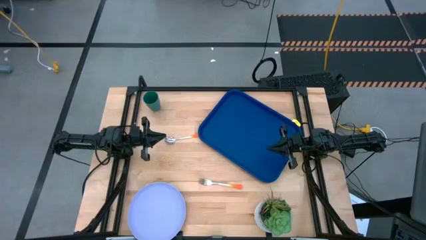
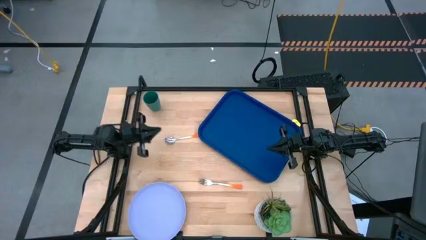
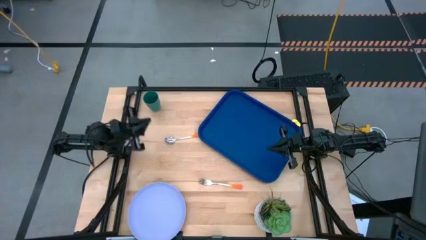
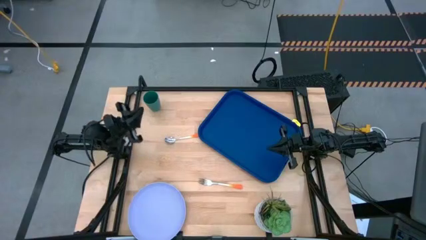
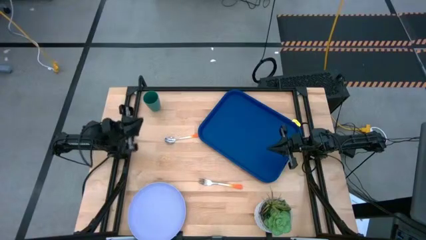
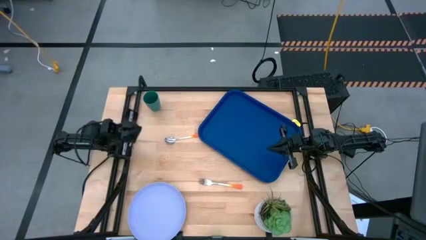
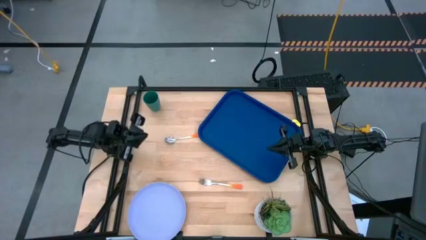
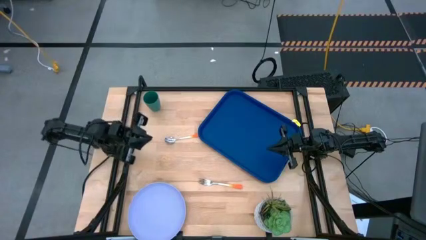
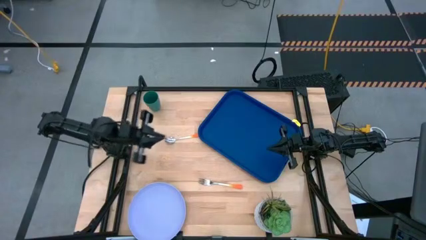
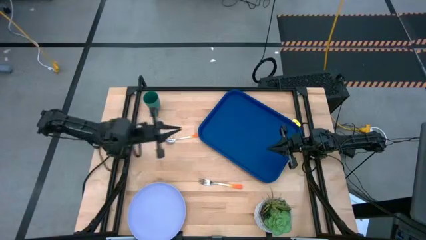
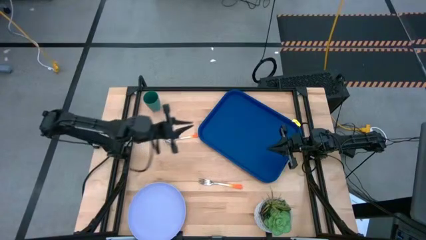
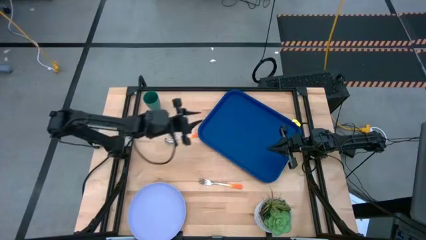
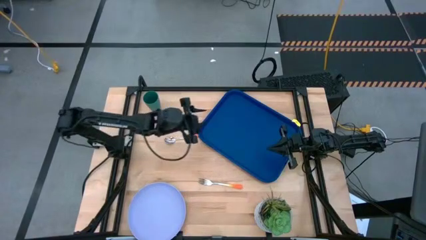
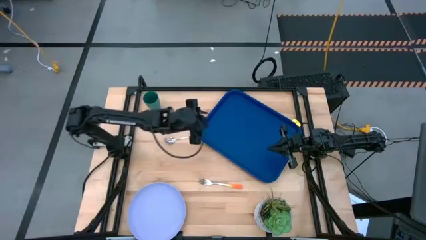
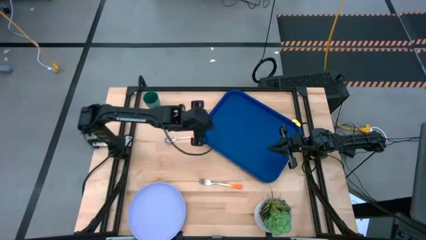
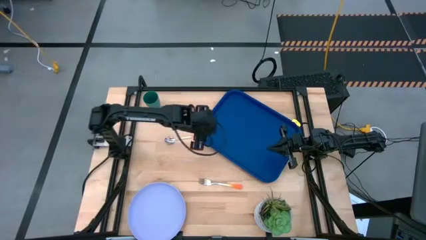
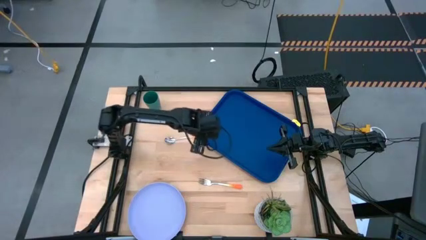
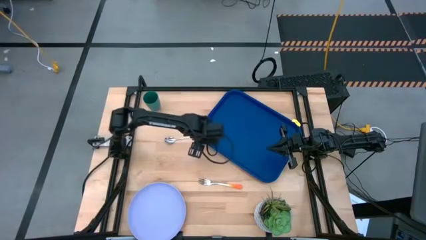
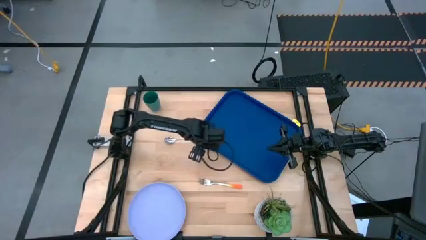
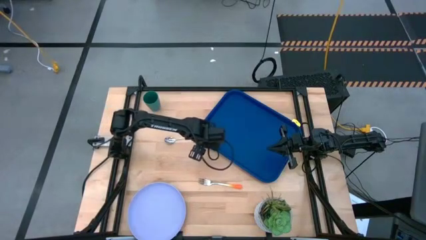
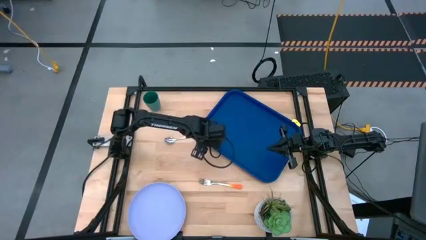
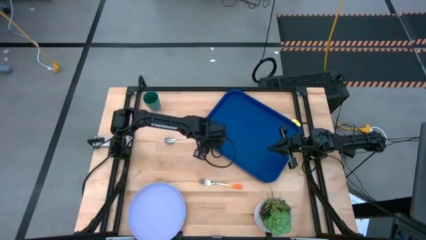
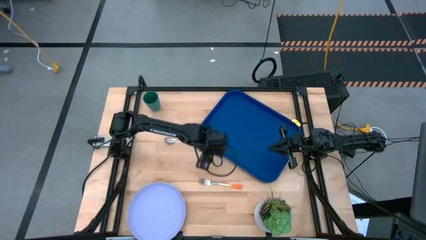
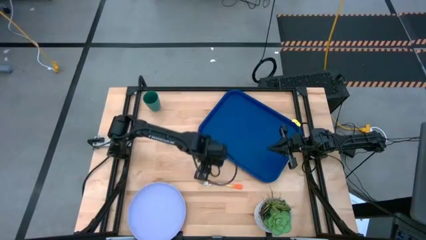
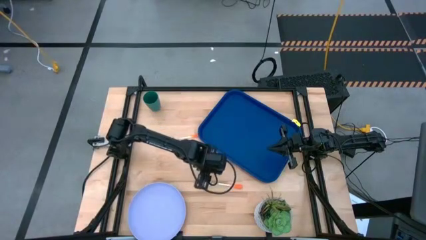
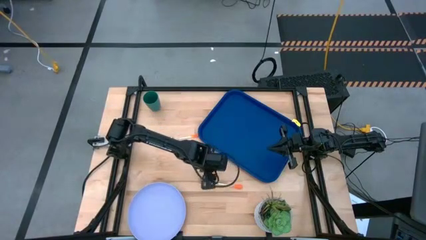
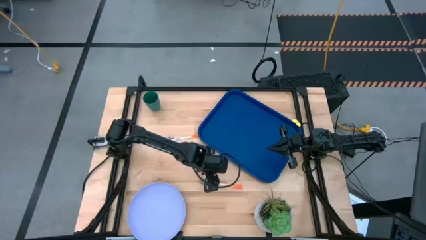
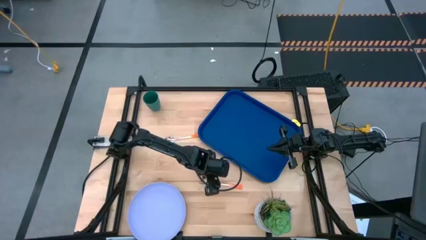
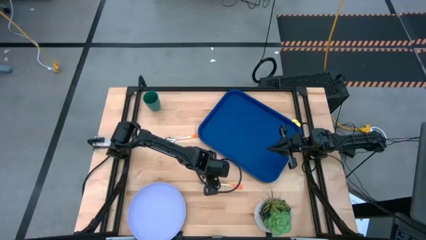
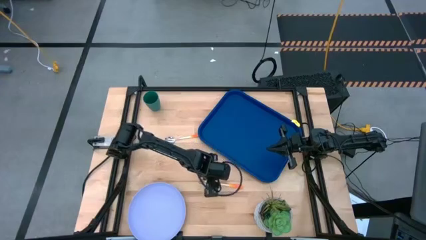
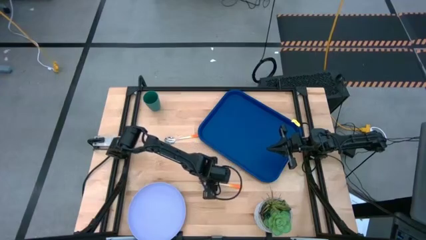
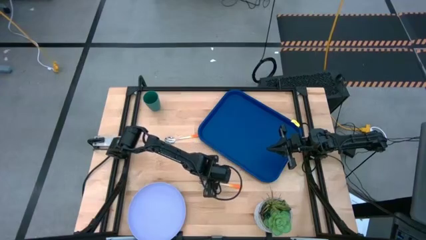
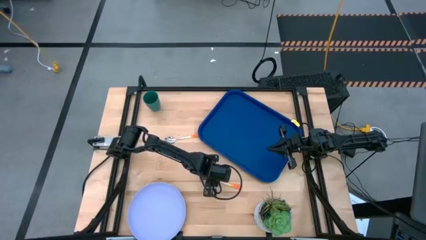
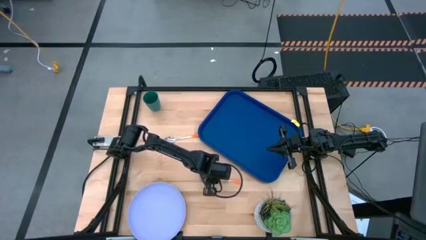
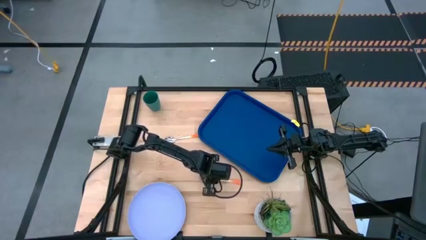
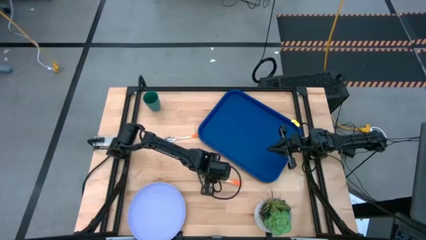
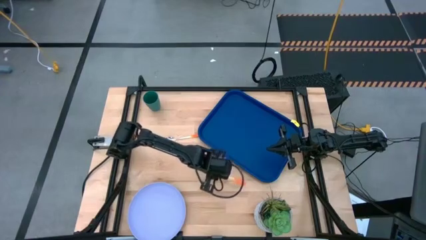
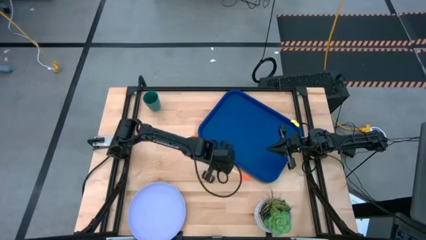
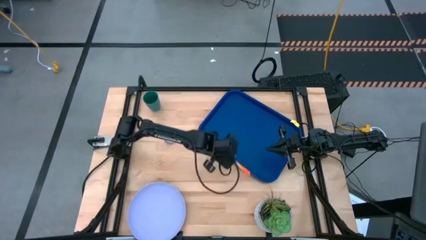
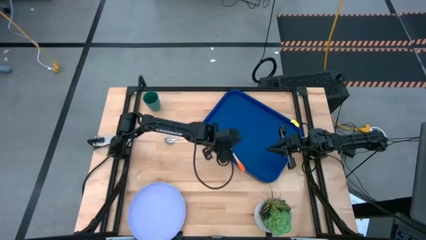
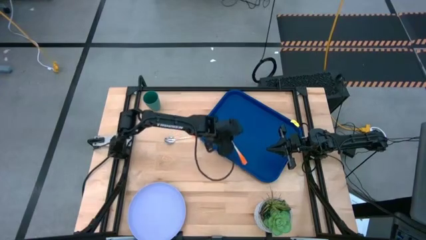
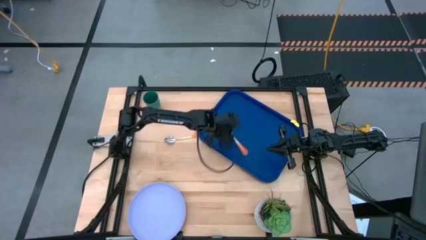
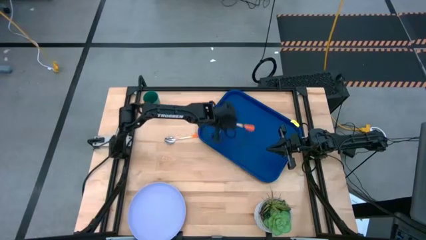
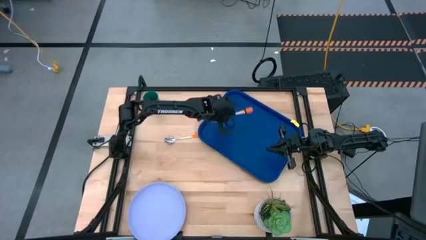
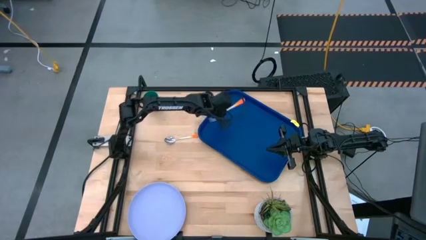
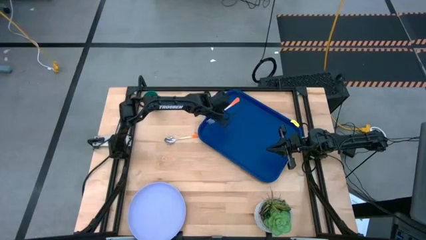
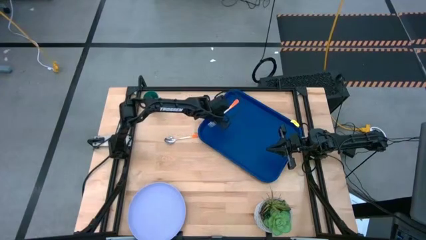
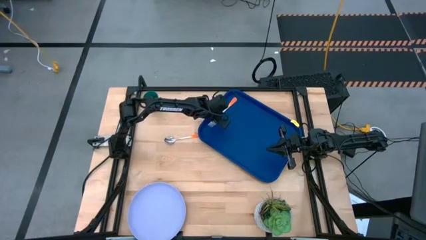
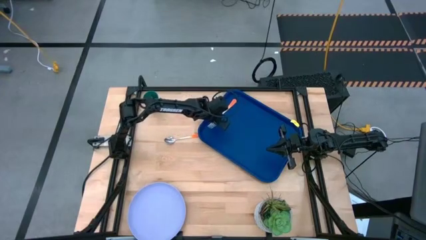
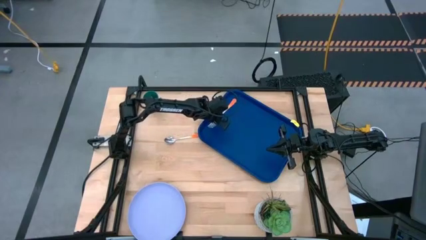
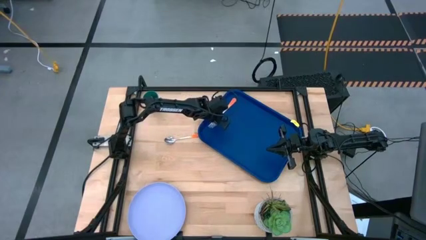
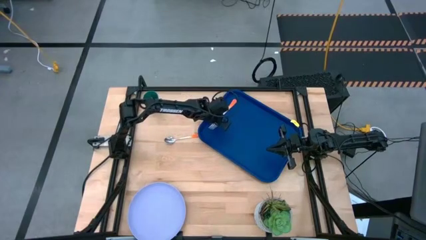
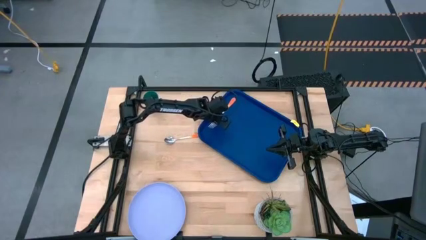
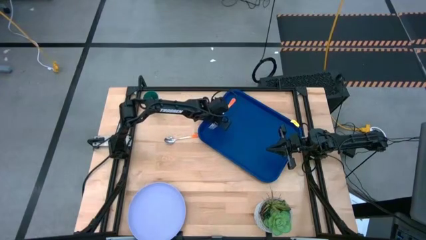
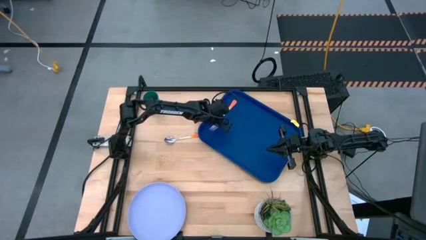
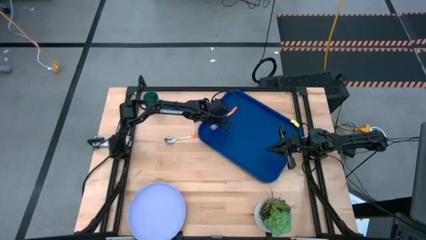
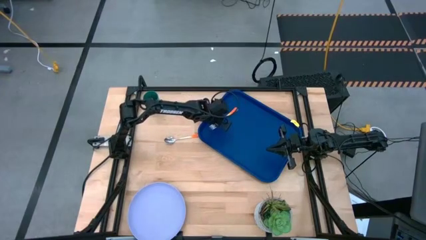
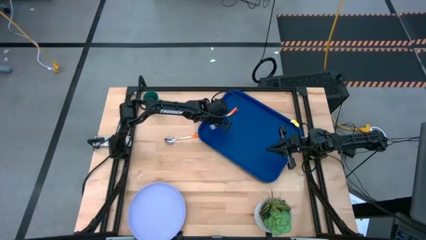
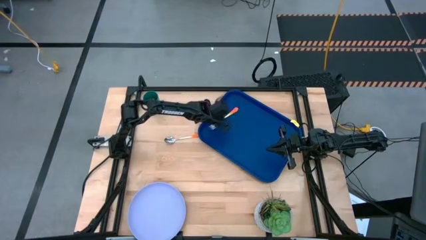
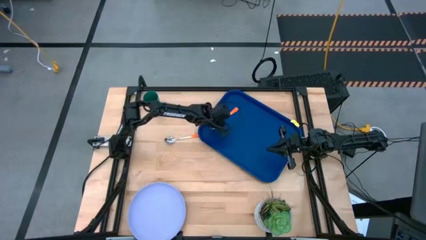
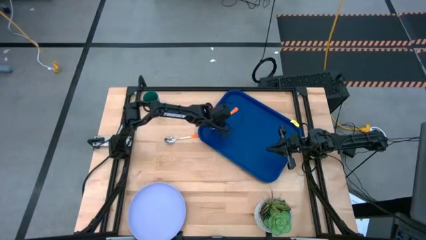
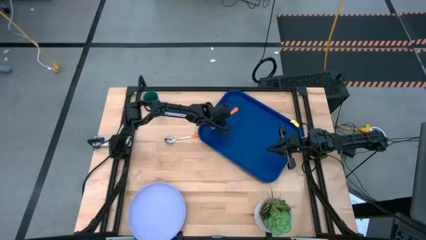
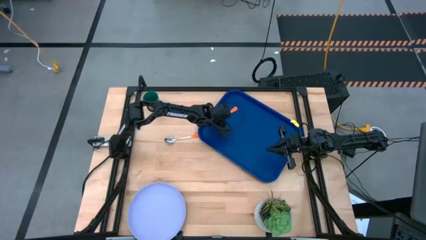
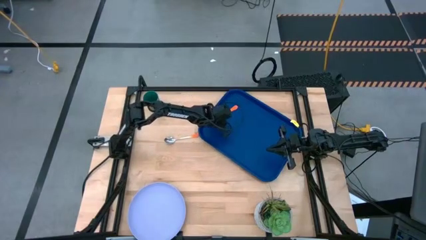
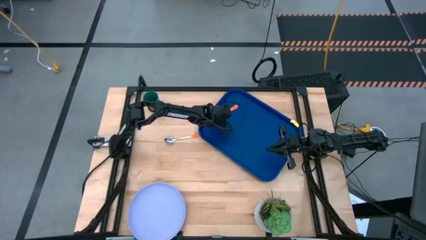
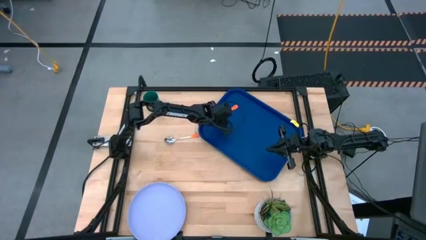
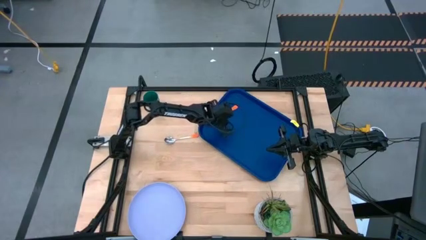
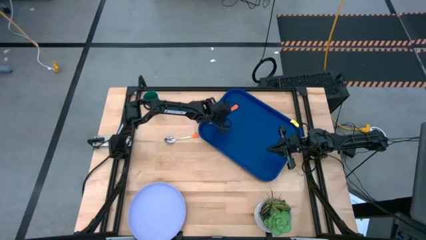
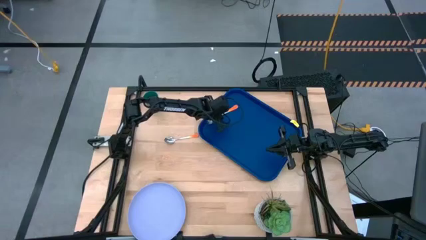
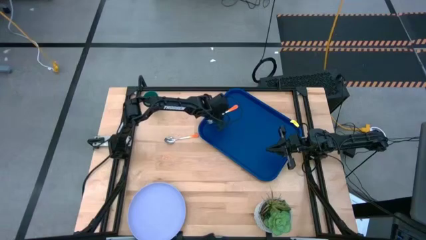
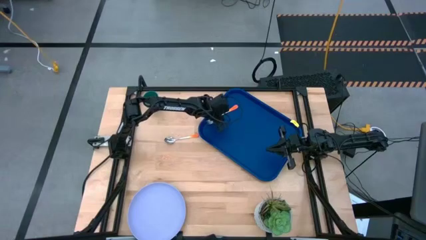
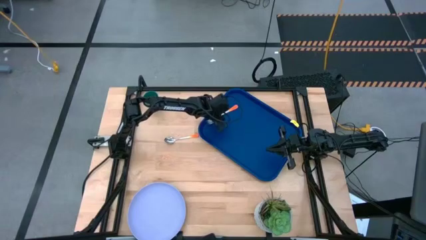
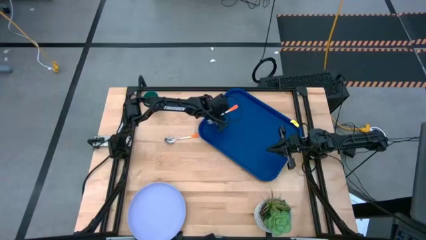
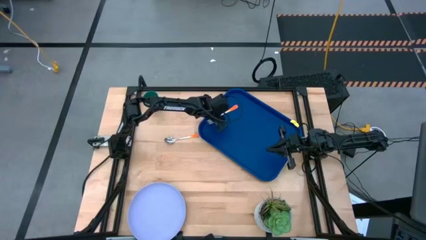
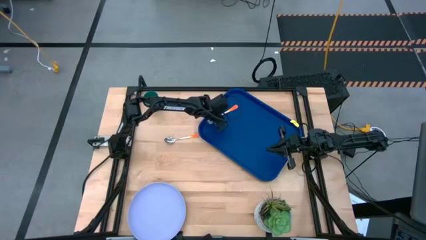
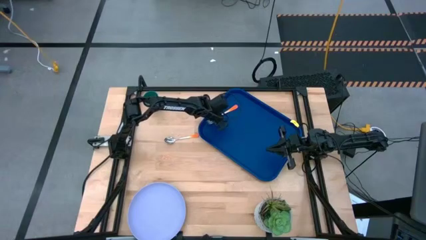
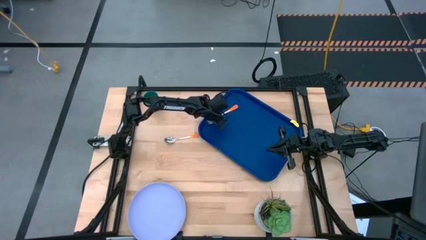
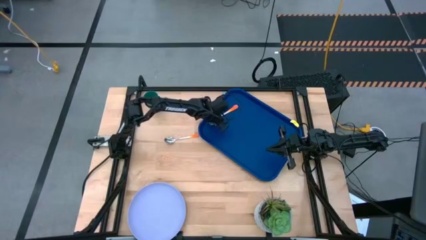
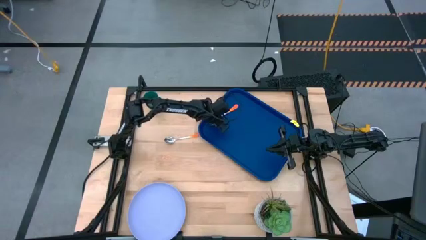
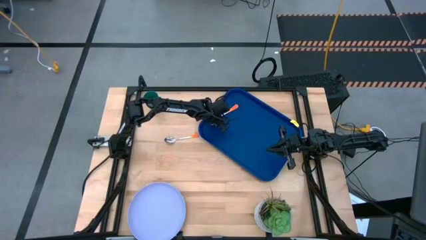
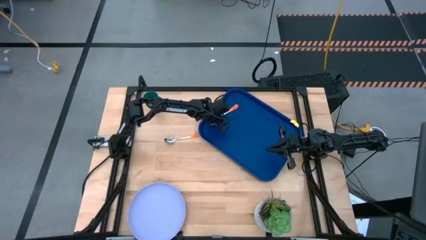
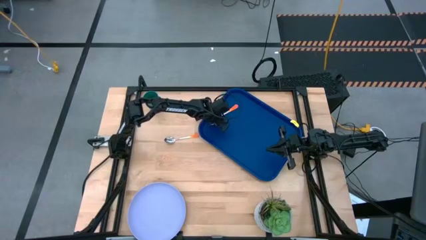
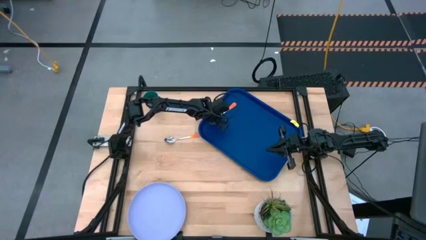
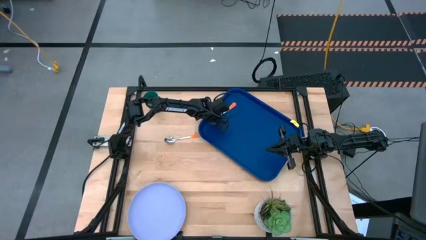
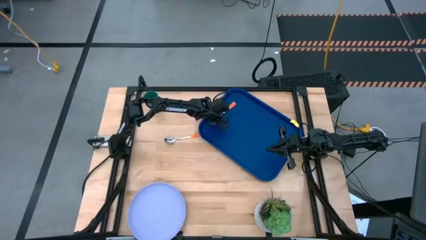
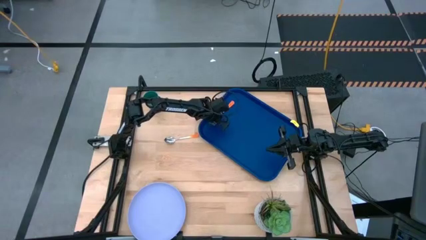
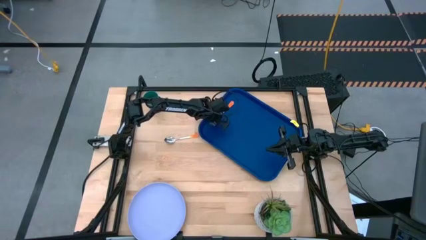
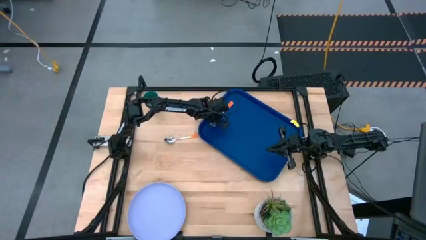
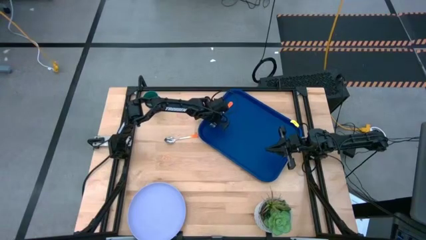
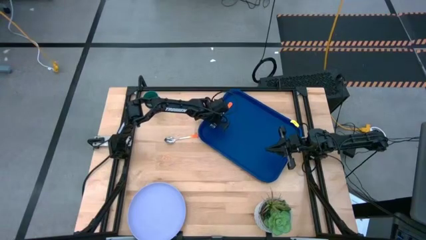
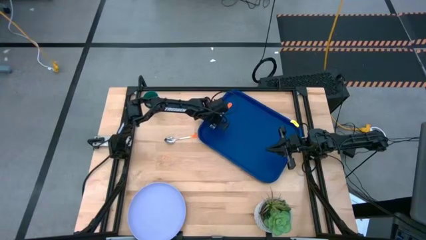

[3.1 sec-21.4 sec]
Task: Pick and place plate/cup/fork/spoon on tray
Put the orange fork on the left side of the blue serving tray
